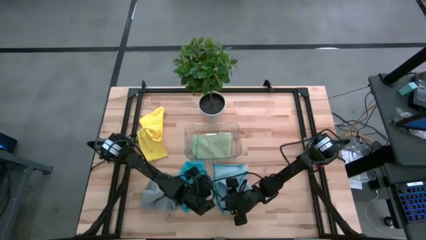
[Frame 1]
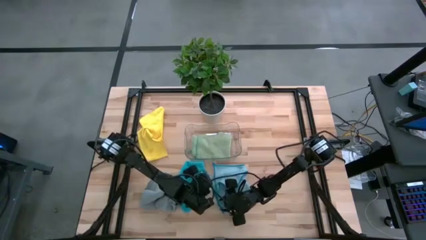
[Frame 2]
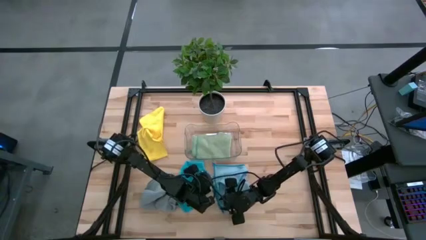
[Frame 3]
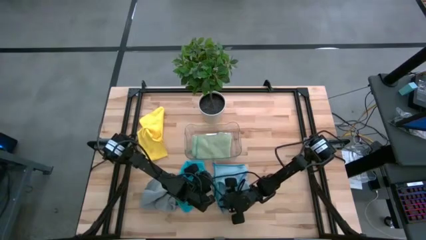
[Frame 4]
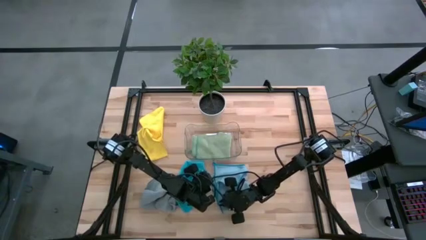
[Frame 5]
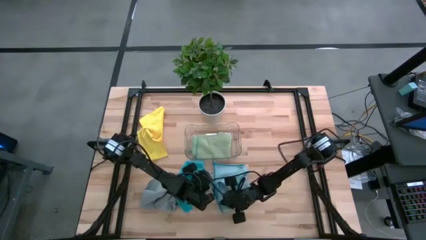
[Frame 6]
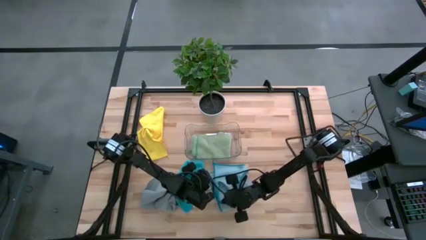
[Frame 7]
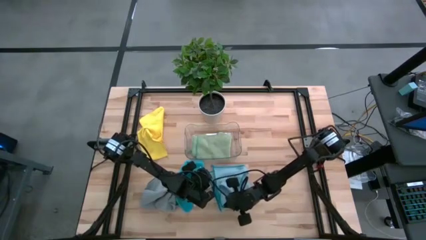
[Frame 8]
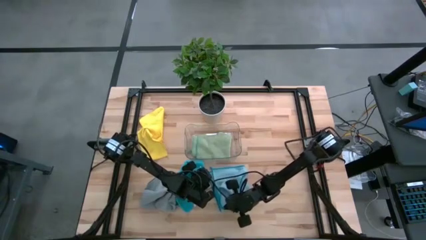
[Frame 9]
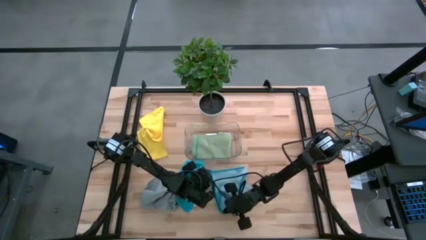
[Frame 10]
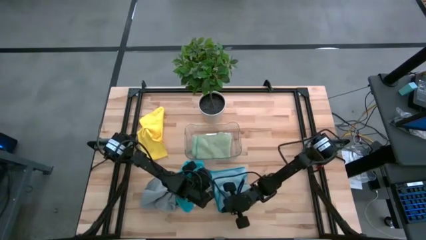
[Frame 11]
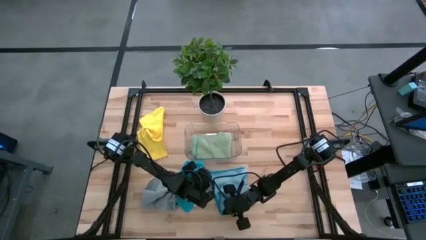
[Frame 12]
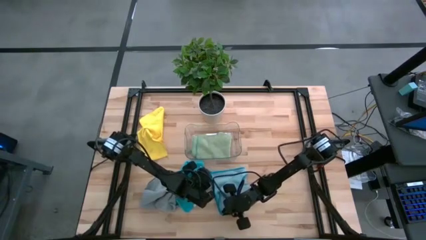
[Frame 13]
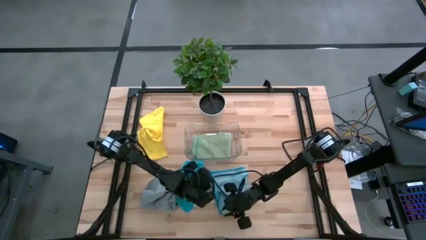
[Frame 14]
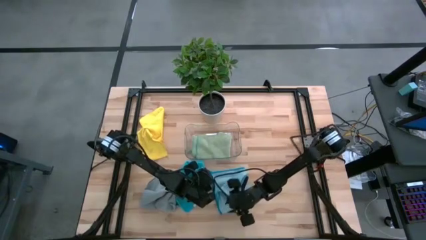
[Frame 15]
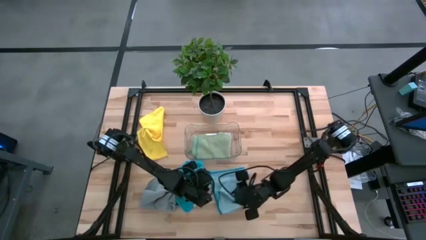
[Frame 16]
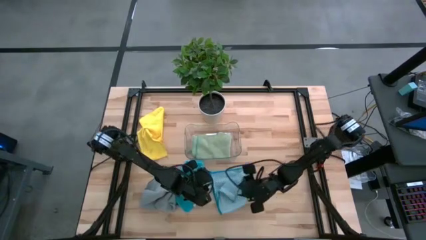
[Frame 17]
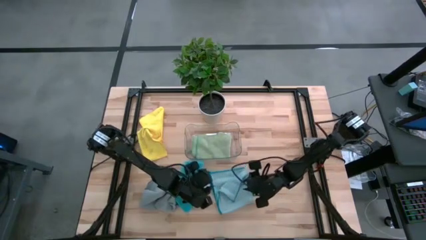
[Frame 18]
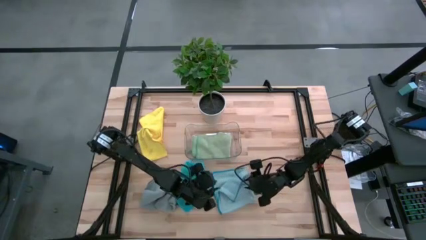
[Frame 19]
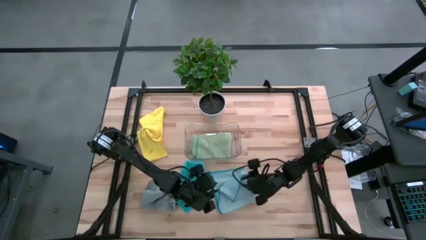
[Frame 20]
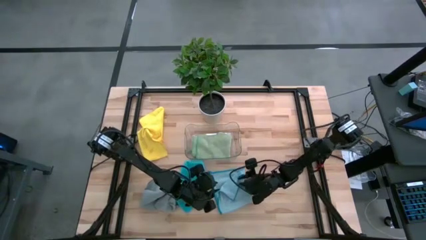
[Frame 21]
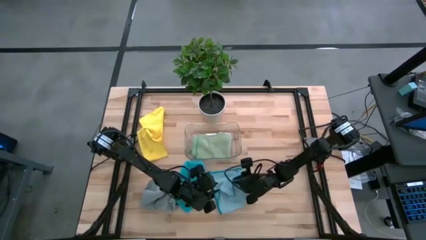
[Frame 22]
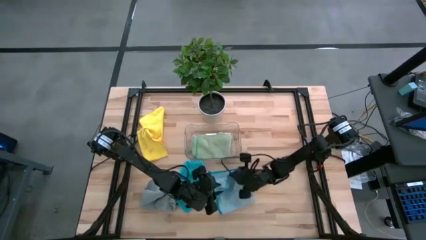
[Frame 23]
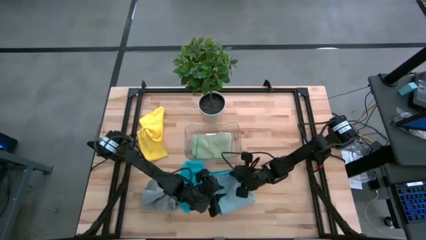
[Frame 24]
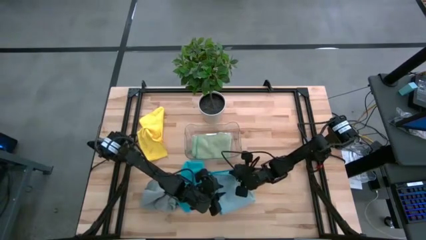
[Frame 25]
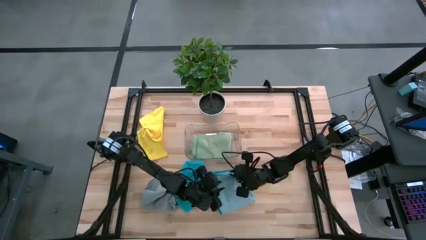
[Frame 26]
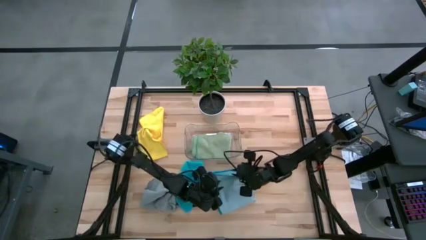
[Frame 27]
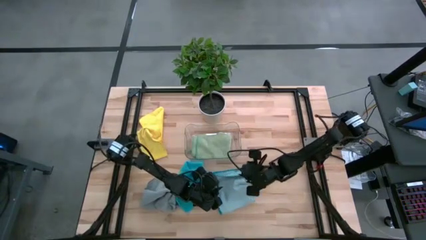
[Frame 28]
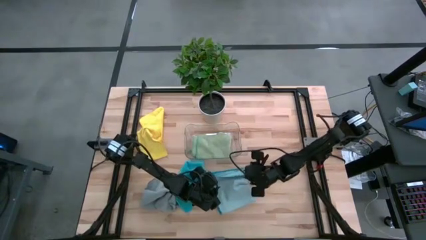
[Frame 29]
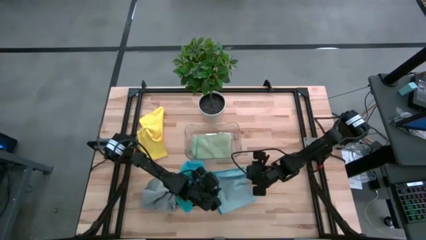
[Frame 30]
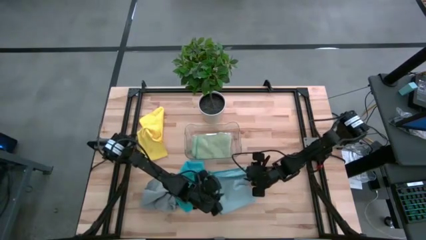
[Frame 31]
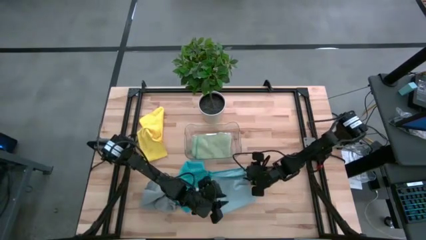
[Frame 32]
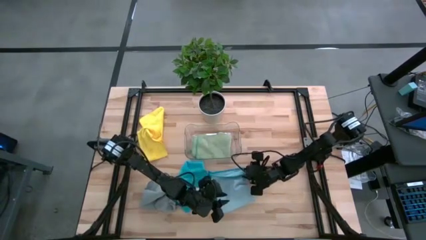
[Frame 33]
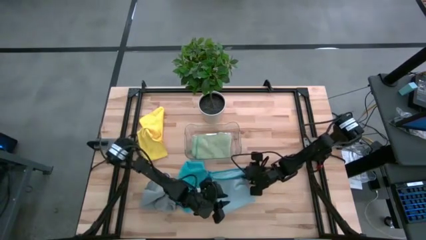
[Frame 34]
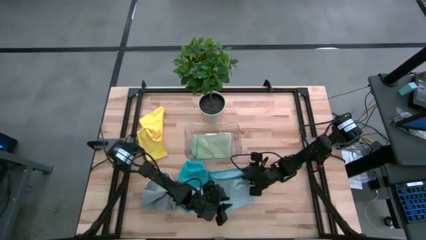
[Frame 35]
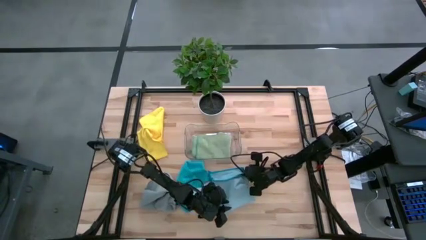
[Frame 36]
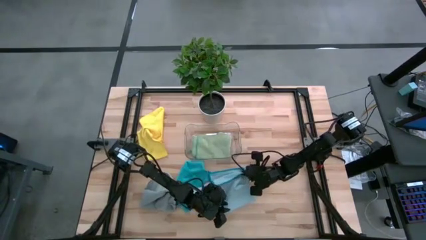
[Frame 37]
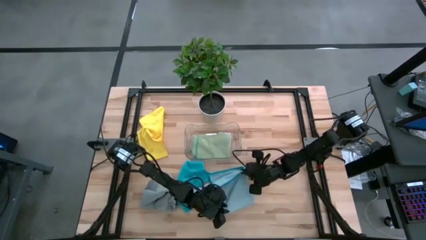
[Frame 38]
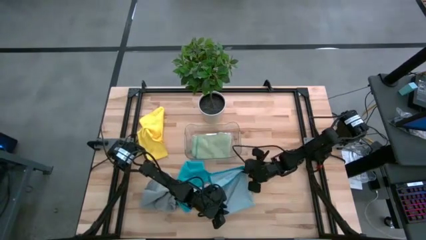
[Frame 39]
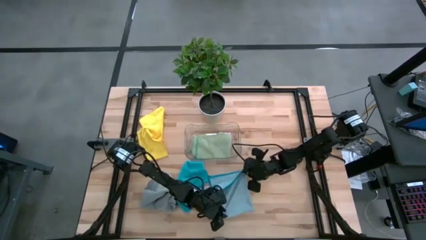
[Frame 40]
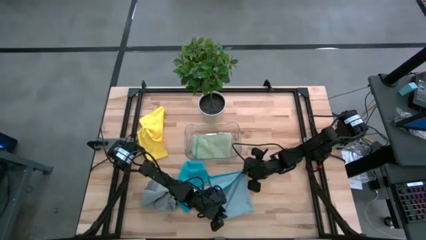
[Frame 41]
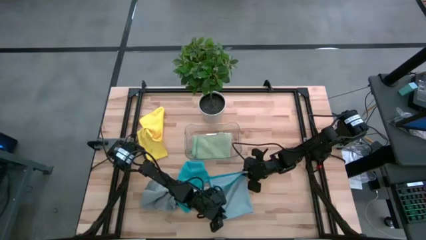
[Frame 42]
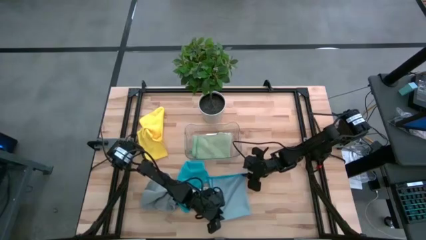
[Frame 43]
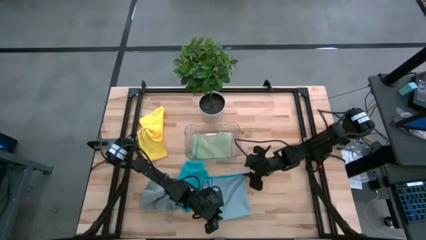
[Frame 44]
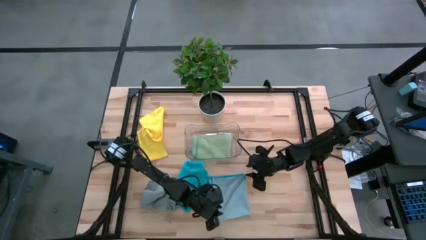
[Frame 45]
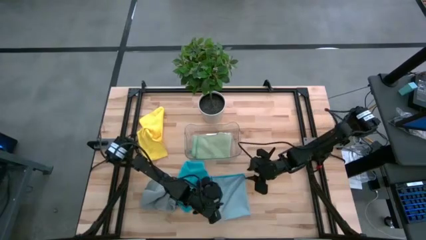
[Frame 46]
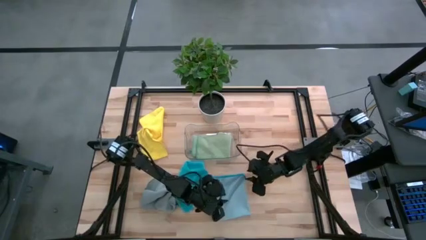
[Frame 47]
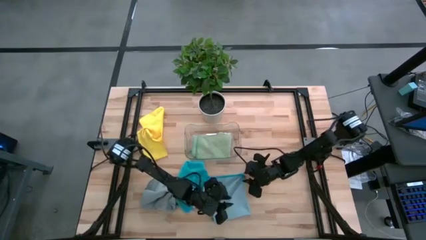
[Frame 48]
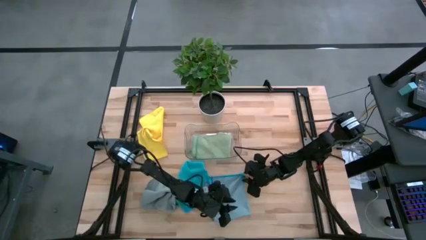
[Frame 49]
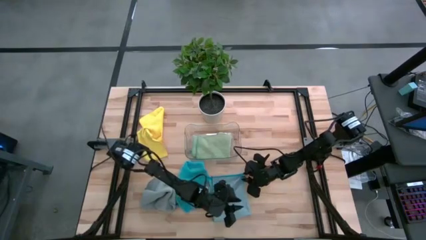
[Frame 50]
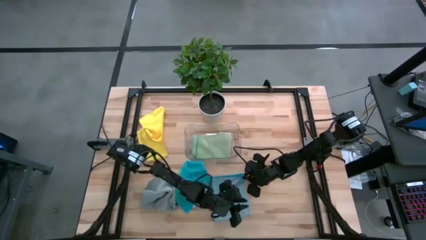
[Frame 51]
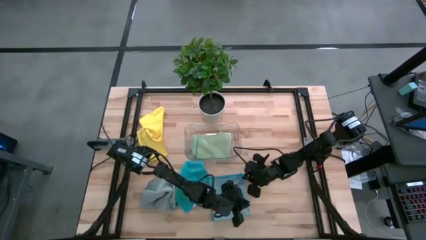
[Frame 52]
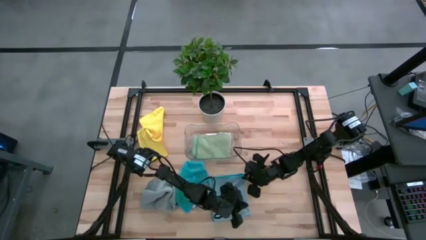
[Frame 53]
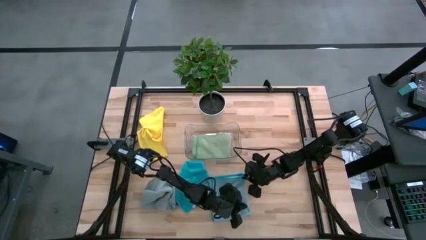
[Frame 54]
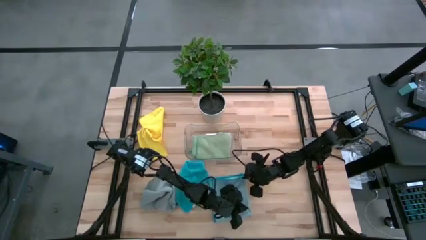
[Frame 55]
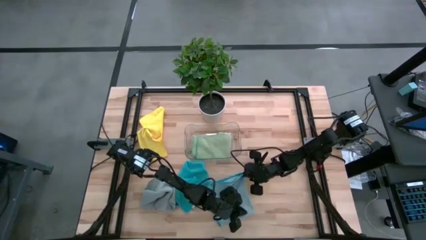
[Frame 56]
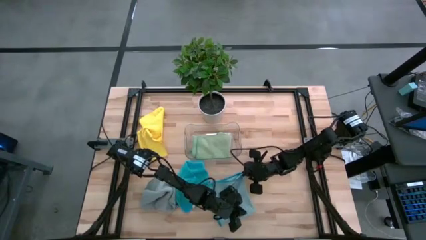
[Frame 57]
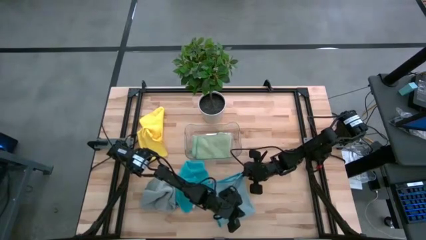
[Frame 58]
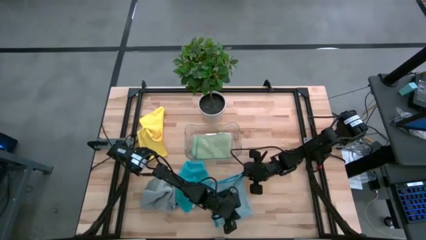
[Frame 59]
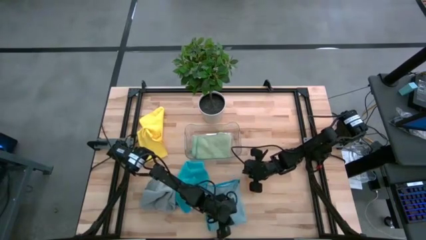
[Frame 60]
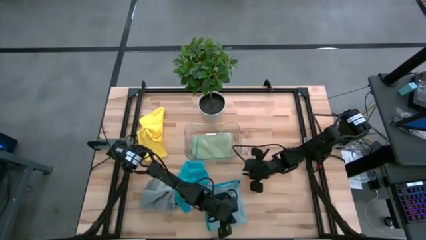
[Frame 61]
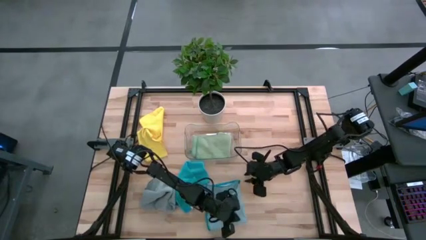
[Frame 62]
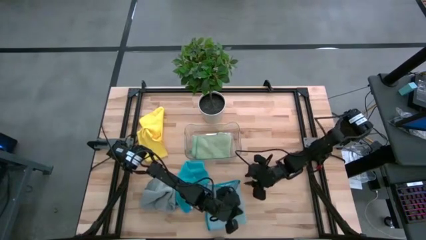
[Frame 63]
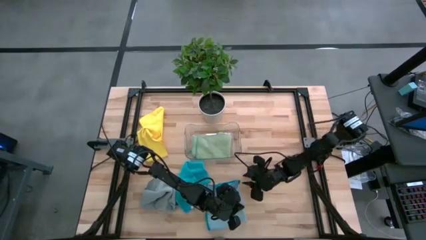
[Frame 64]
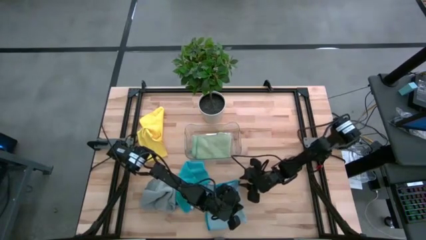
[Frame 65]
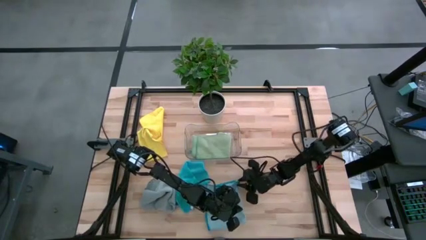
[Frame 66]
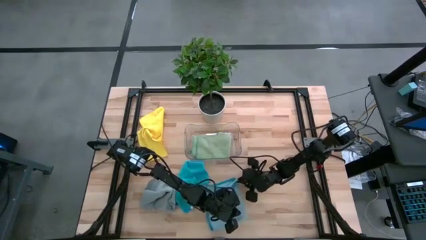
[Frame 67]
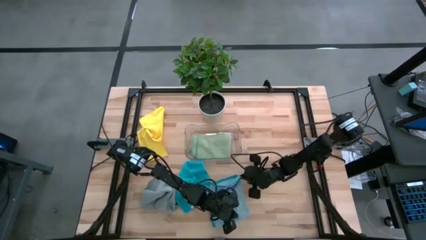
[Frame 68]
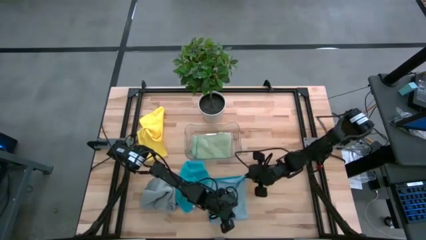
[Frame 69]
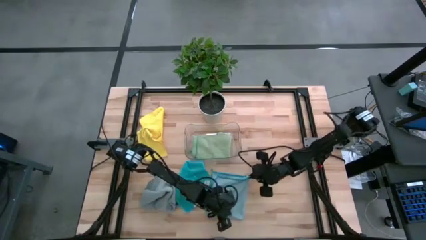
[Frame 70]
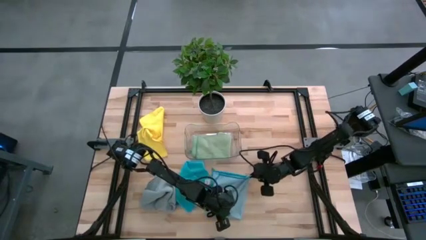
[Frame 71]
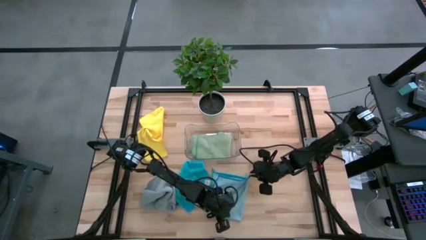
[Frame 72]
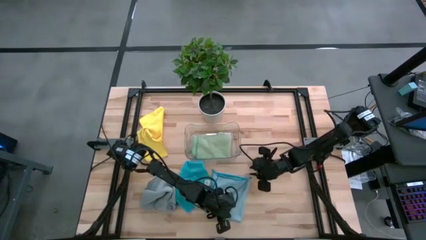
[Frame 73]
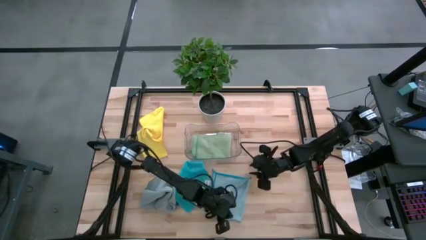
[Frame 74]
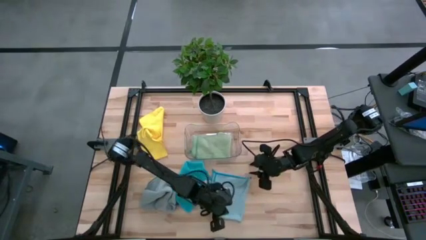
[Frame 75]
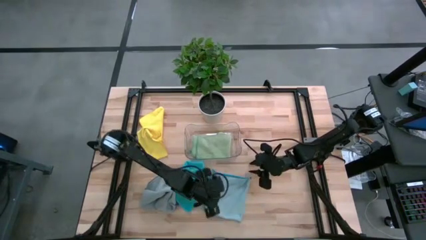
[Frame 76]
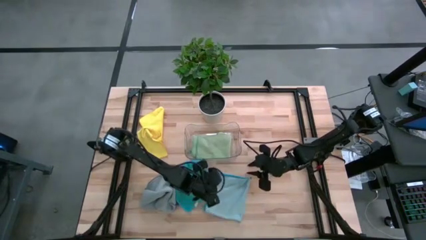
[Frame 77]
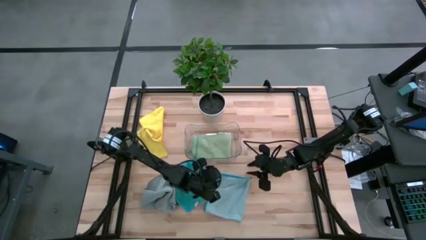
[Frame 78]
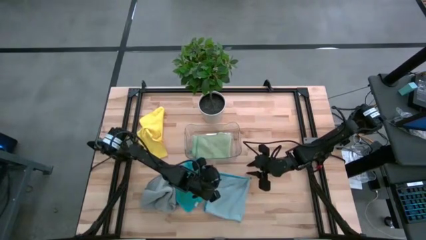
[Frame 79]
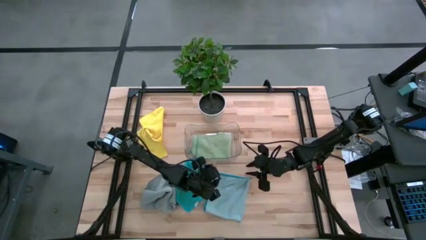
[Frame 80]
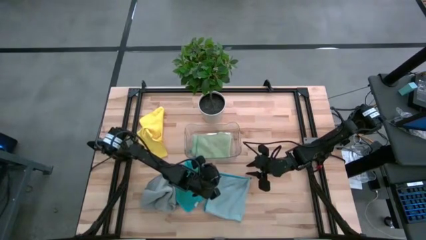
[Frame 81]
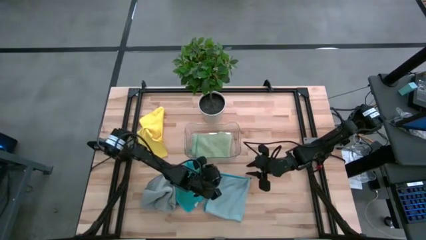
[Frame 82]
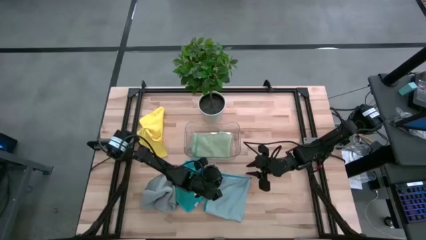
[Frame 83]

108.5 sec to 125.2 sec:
Task: Fold microfiber towels
Fold the light blue microfiber cloth
